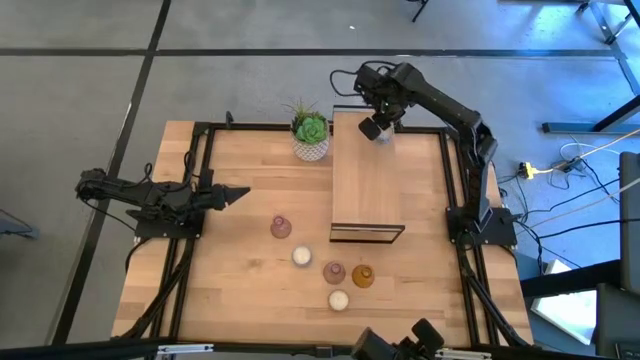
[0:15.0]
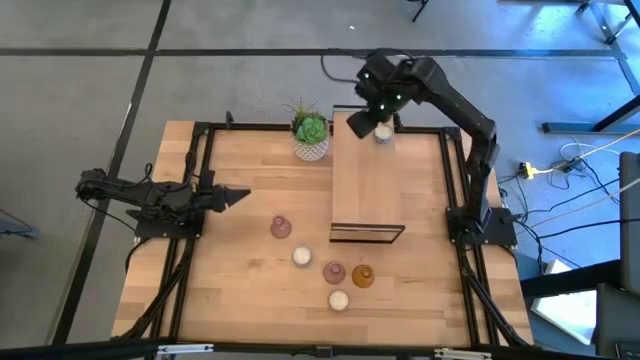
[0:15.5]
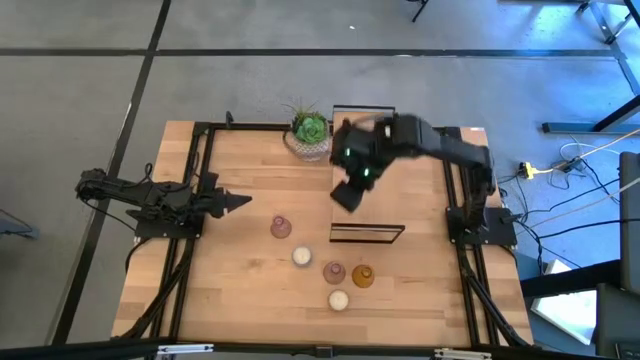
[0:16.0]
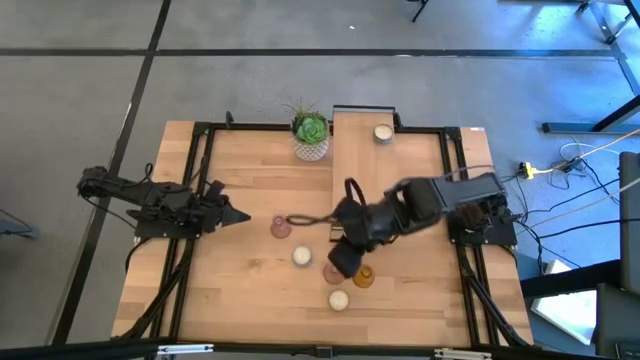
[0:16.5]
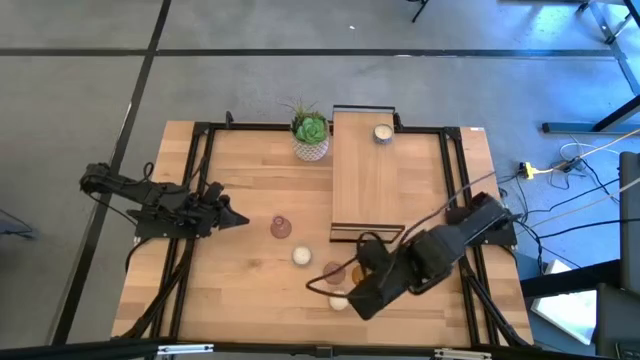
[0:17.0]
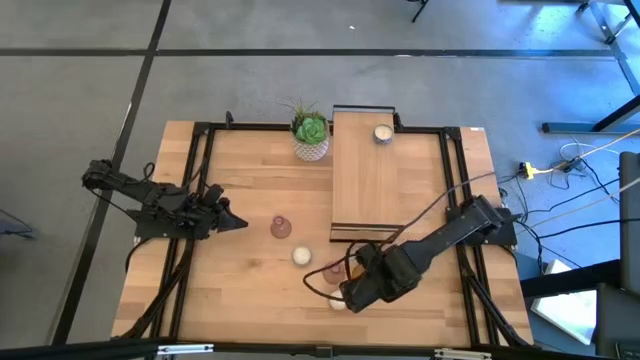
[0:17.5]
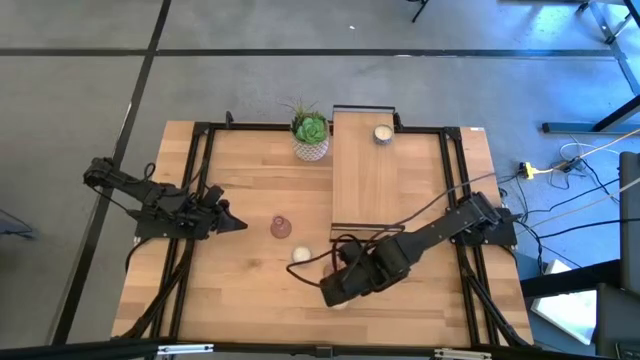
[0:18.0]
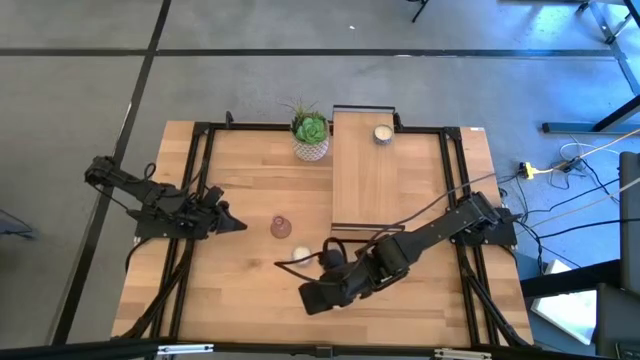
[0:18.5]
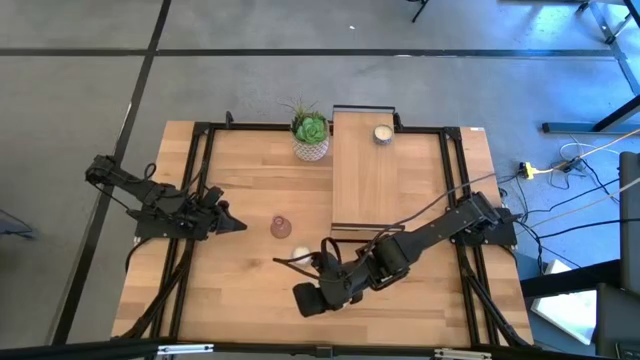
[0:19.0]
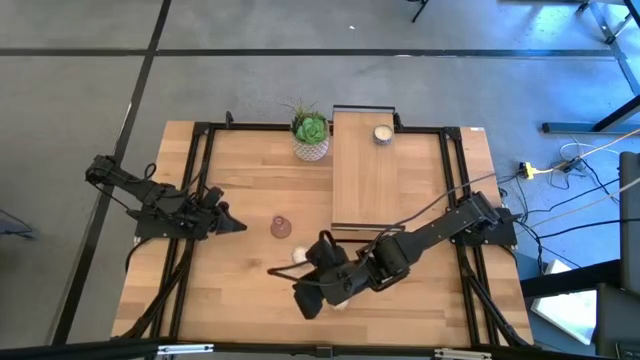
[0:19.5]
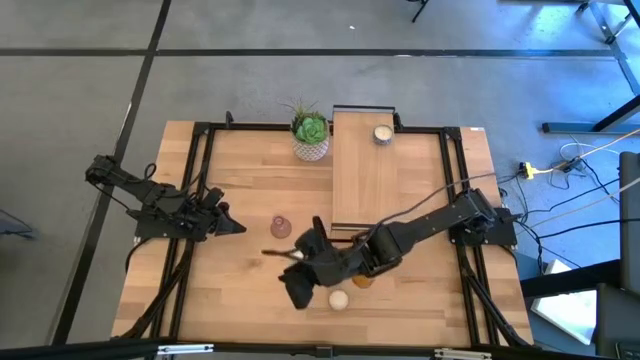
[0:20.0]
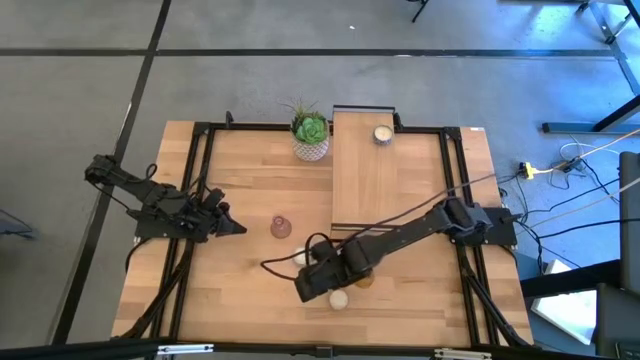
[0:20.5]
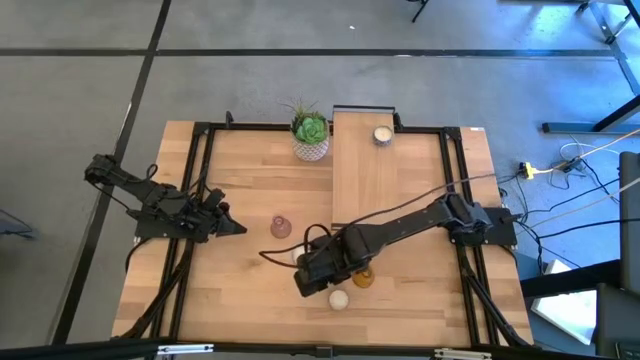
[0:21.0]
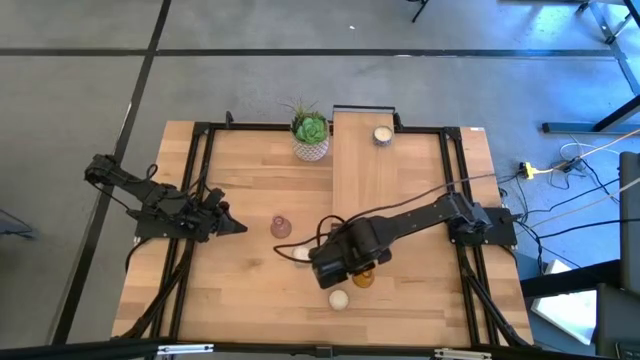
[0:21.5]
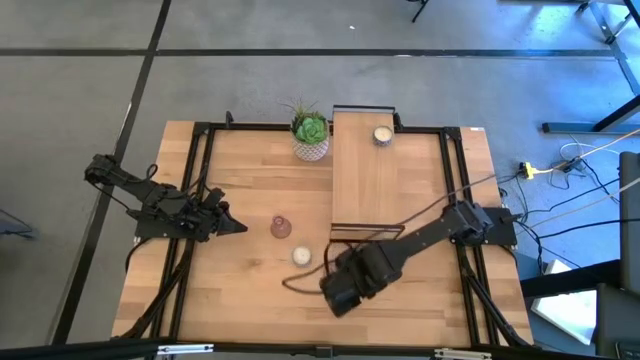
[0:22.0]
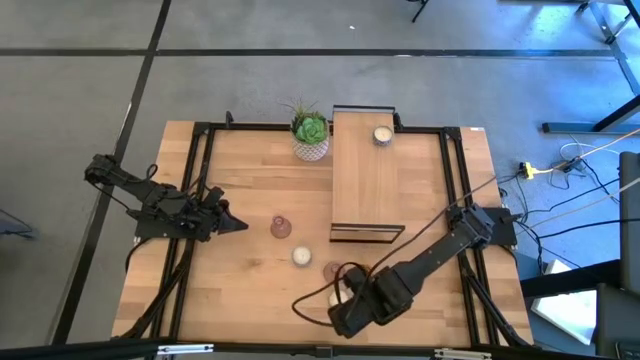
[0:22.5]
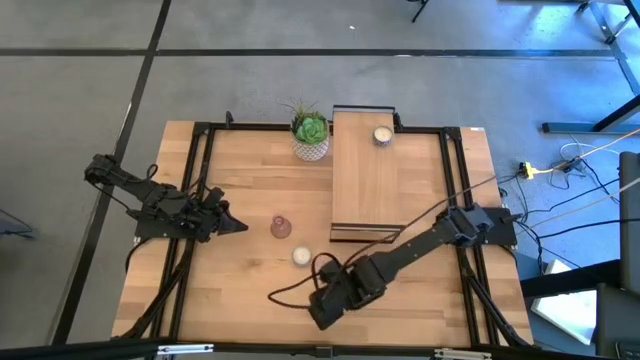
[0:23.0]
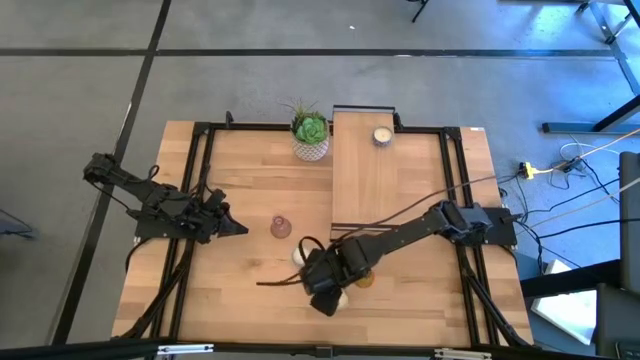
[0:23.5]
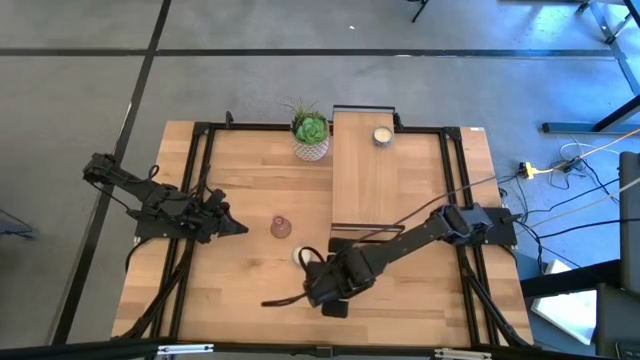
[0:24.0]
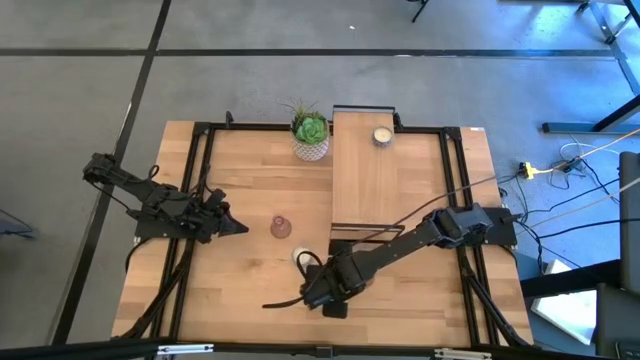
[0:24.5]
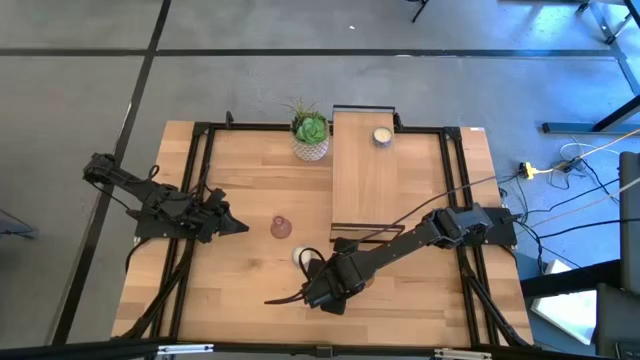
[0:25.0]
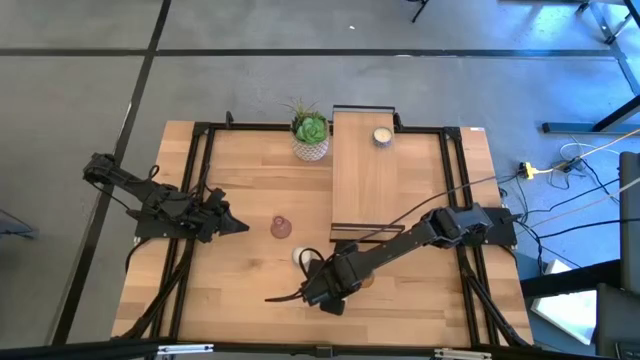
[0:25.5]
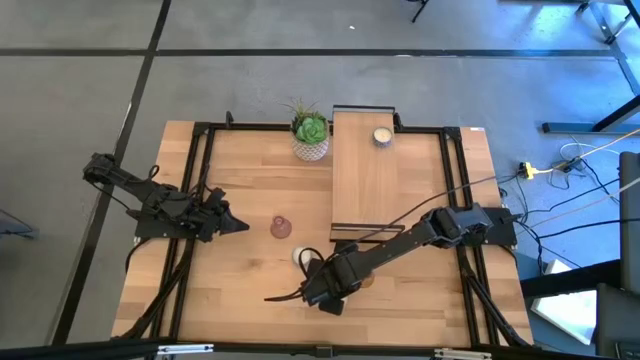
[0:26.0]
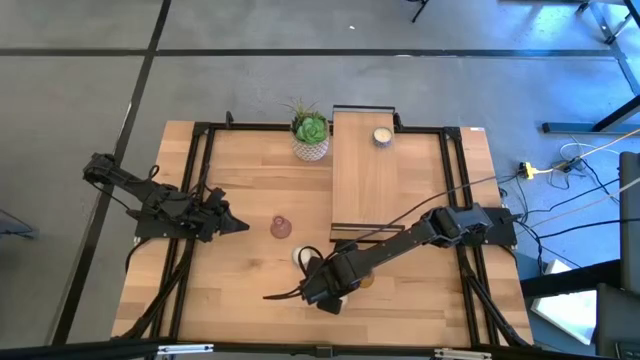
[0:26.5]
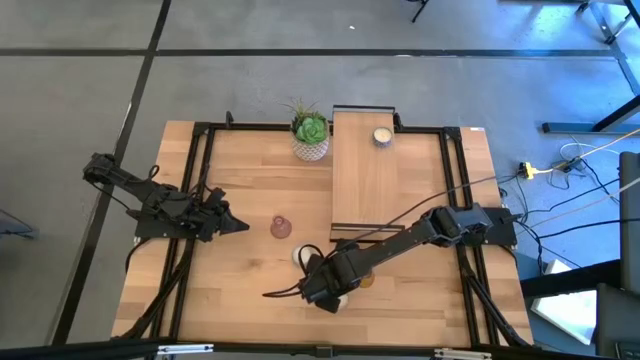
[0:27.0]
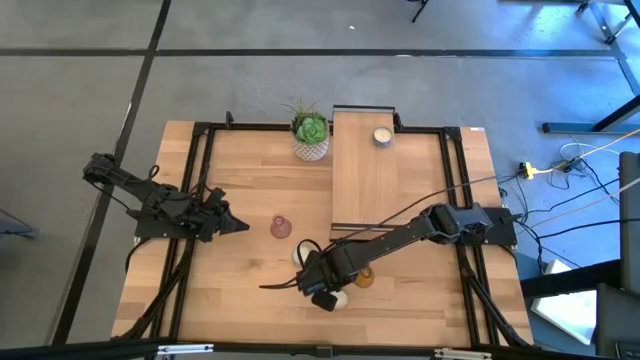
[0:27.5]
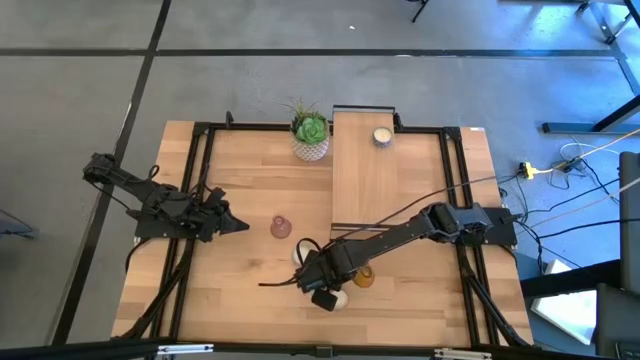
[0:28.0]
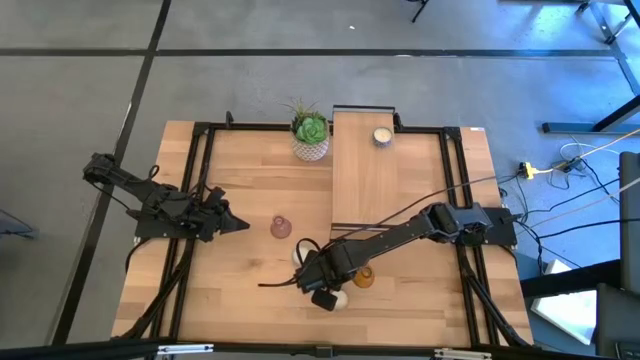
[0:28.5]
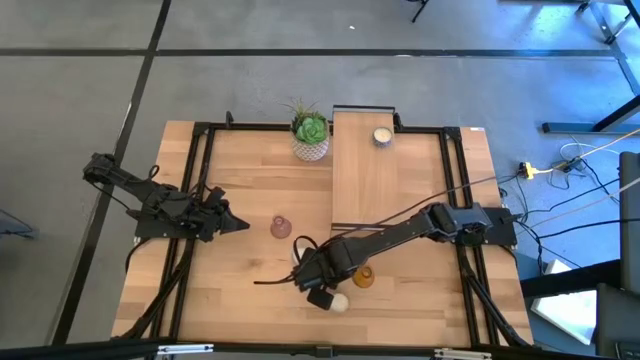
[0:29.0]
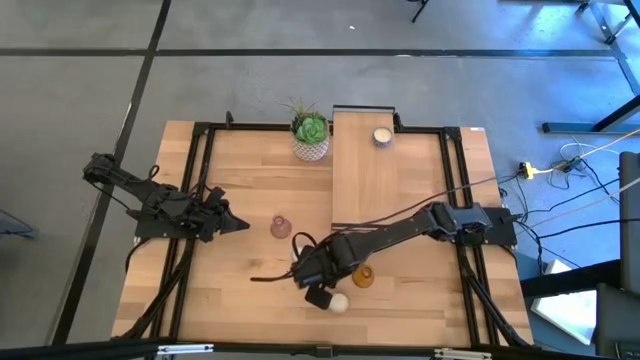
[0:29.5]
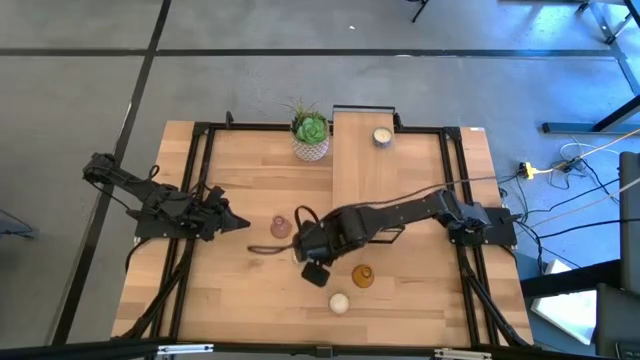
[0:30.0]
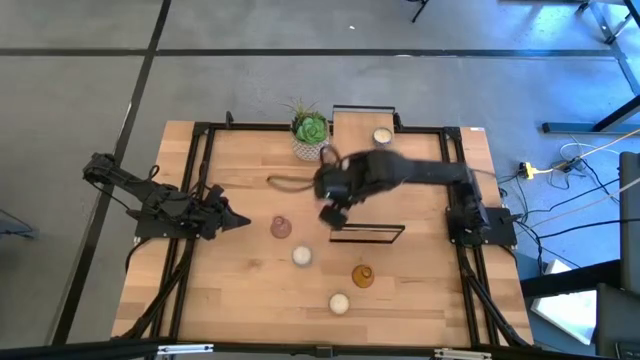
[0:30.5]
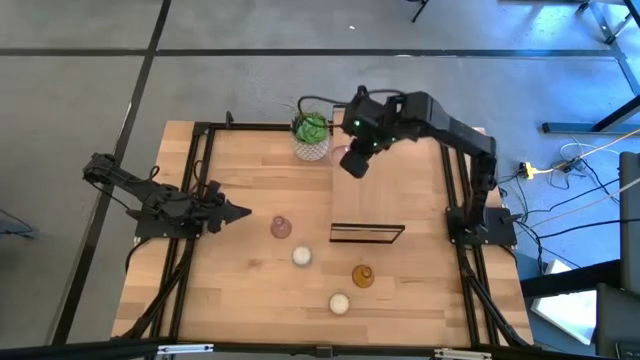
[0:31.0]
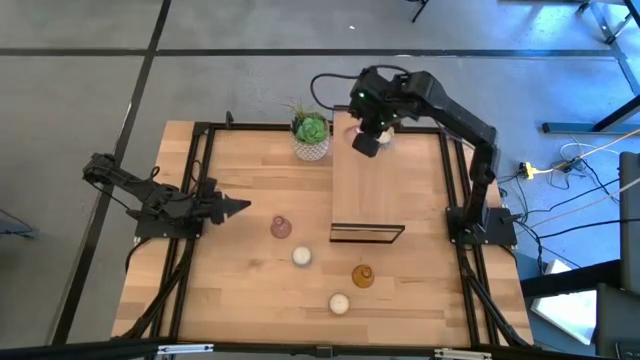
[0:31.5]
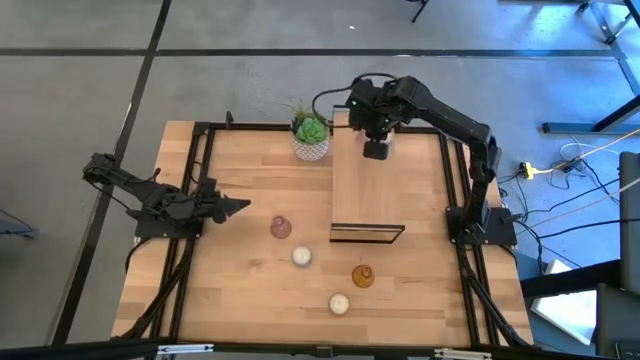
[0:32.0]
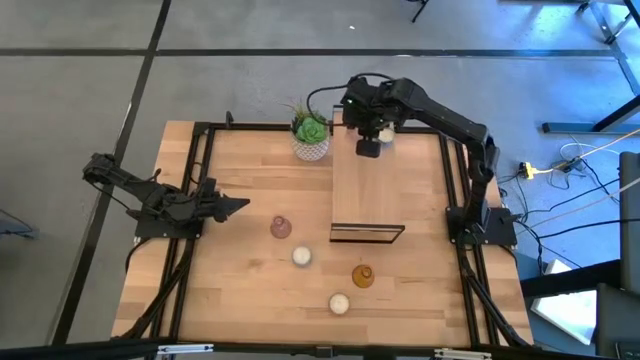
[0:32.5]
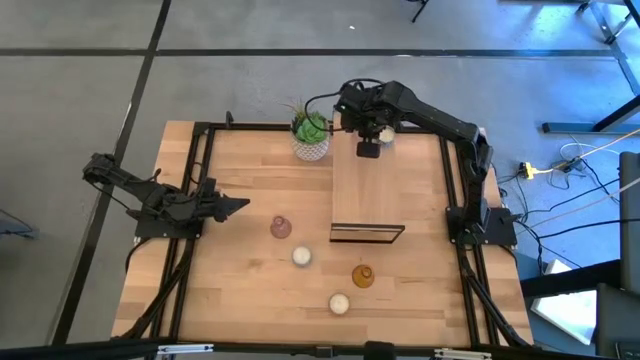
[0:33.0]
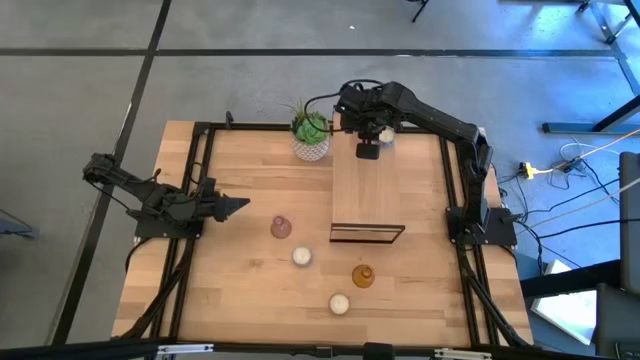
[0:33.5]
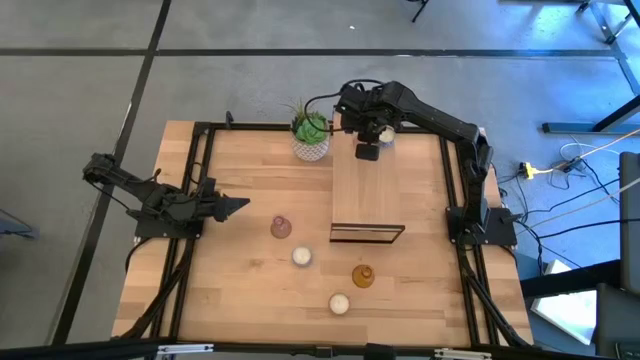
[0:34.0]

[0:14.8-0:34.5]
Task: Pick & Place candle stick holders
Put the bottom pink glass candle holder on the shelf
